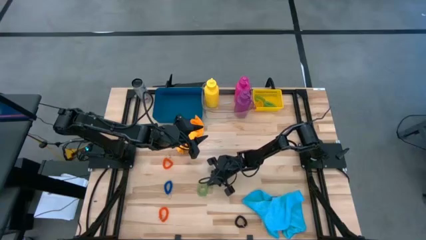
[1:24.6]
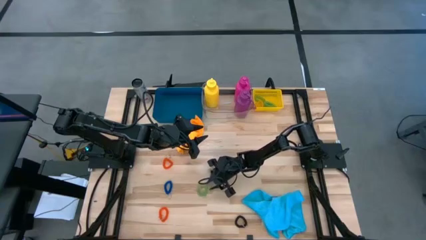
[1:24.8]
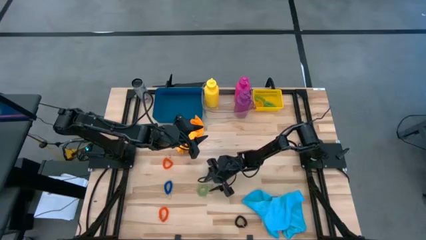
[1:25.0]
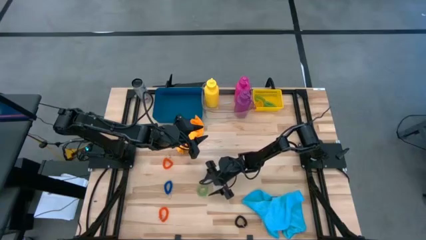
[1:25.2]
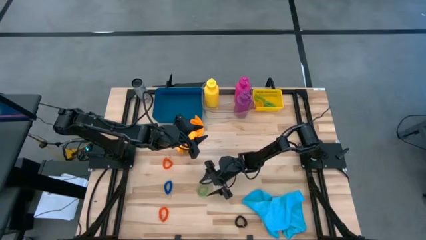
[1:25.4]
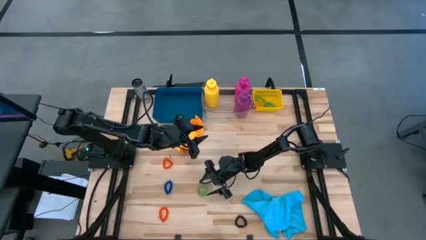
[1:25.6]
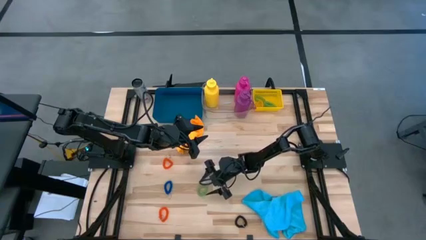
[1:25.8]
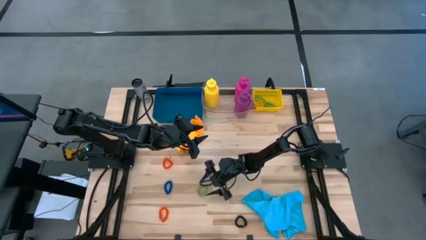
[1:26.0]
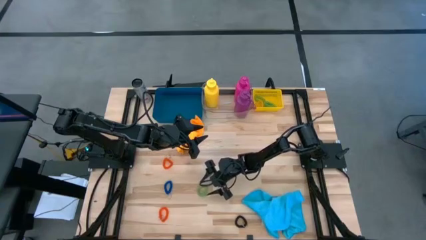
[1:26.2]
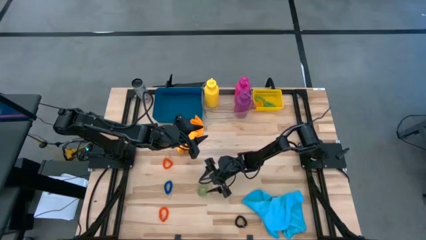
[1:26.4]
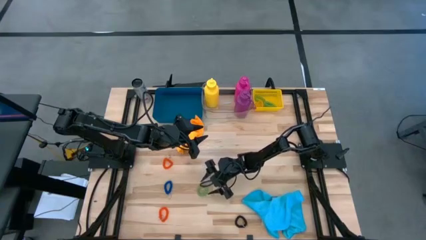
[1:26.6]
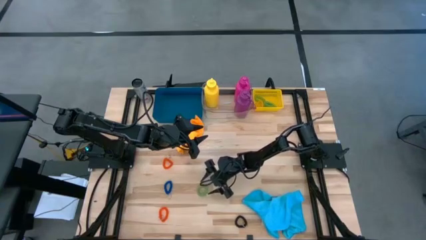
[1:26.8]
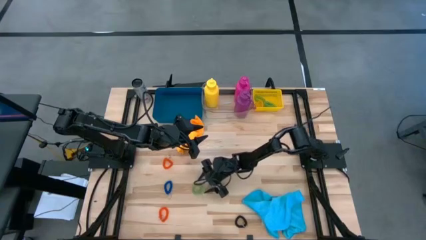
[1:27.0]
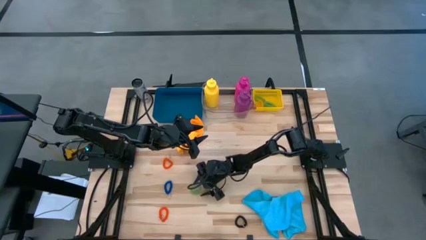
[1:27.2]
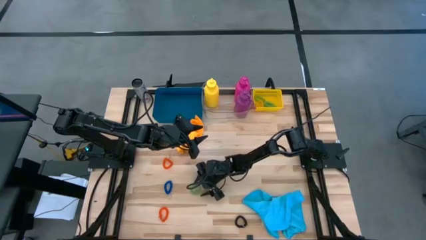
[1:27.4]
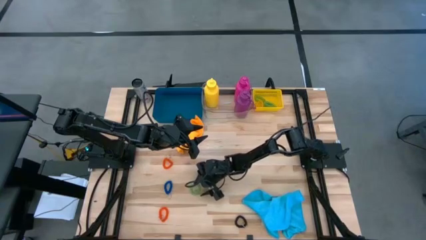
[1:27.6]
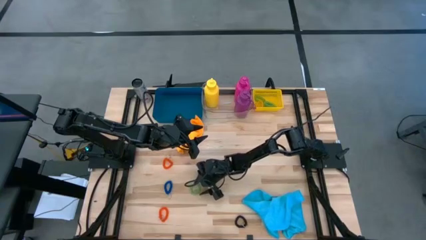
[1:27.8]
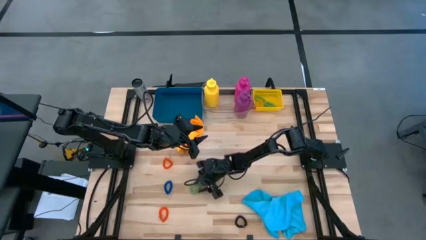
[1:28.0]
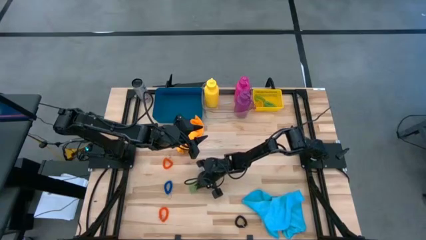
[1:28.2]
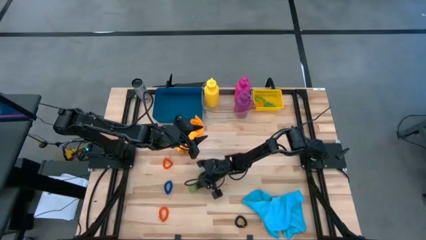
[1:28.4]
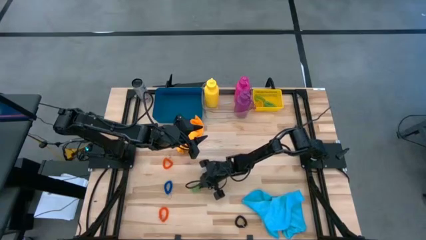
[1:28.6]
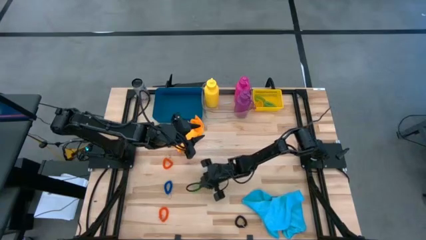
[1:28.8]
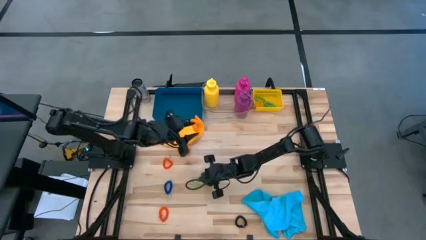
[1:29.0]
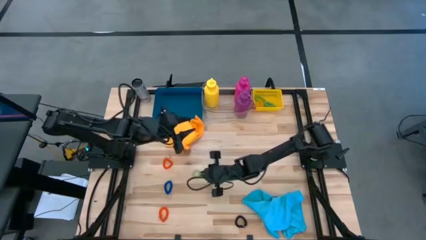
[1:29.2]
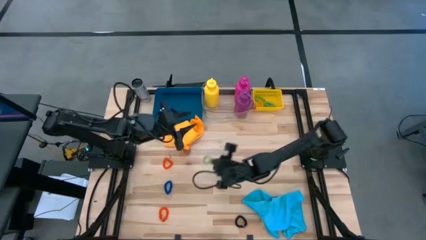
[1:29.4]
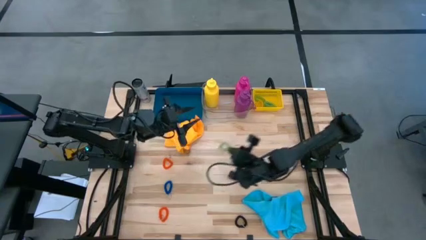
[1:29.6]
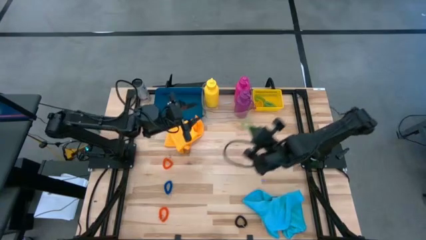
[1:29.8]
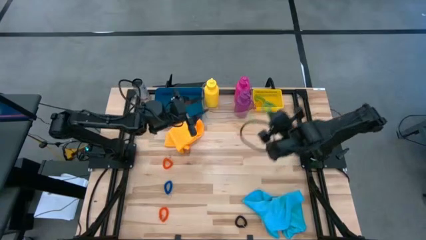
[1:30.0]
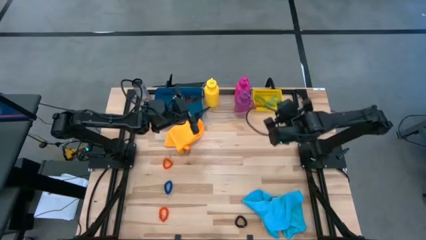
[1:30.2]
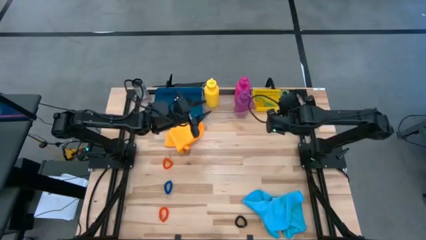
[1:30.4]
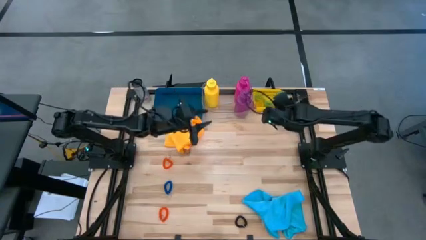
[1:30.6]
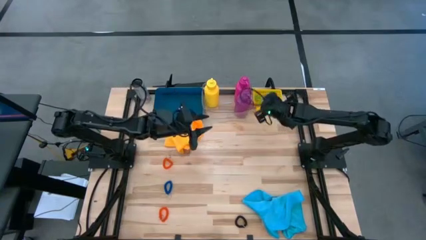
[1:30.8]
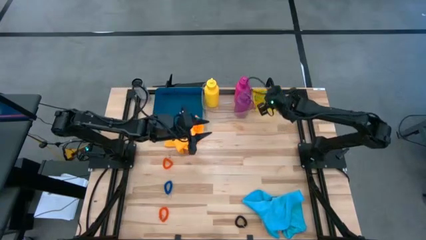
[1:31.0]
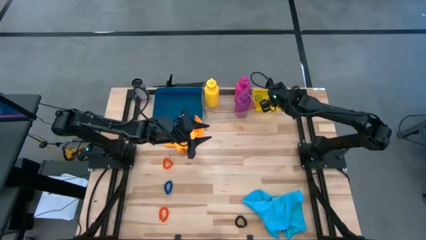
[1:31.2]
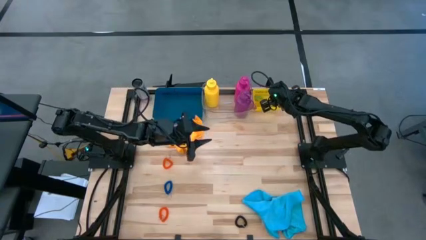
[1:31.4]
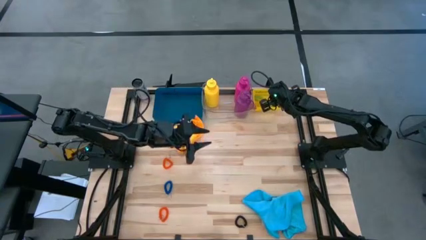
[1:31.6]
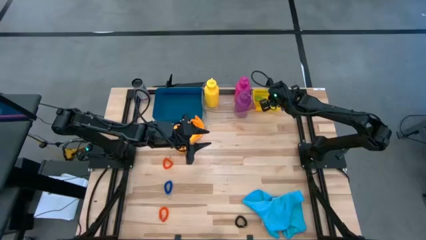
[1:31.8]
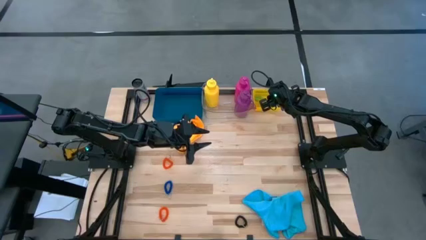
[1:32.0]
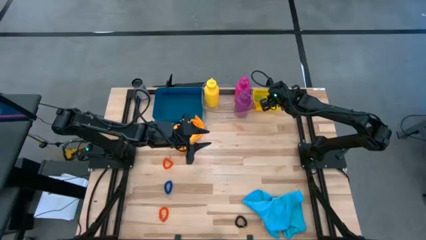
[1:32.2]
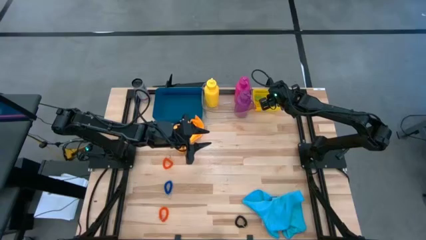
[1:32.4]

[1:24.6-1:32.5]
Task: Pick & Place Sports Items
Put the green spring keychain into the yellow bin

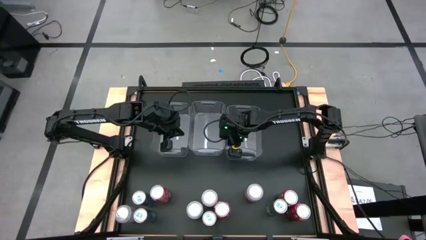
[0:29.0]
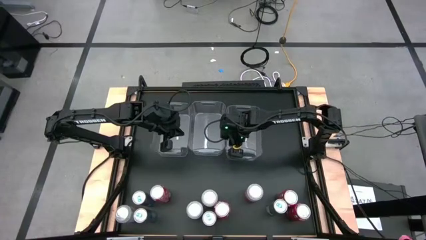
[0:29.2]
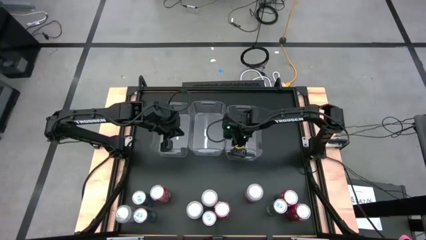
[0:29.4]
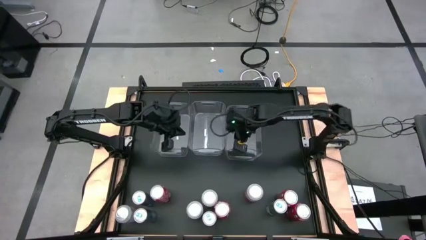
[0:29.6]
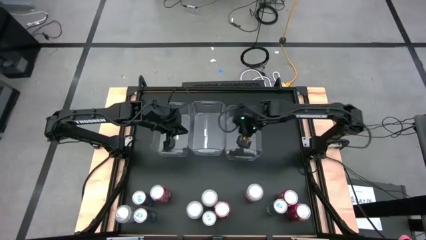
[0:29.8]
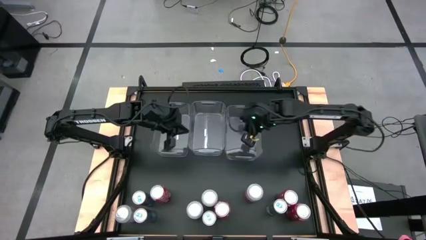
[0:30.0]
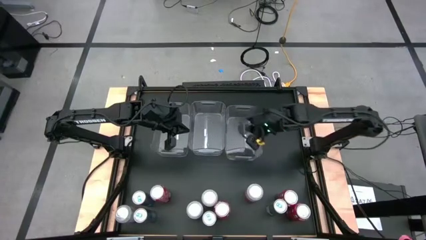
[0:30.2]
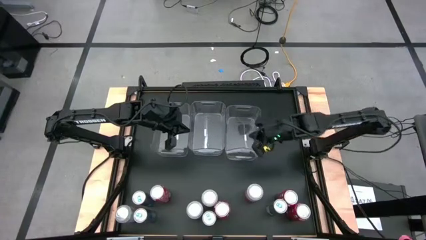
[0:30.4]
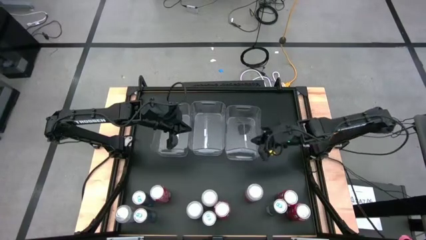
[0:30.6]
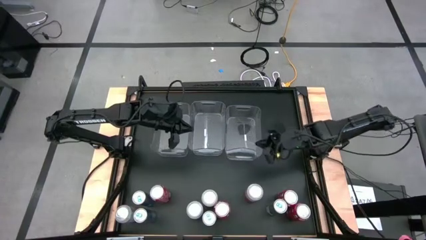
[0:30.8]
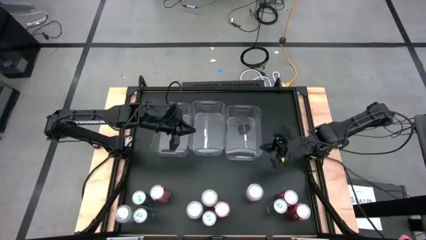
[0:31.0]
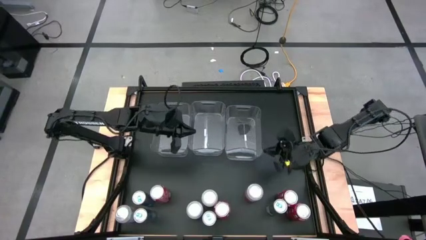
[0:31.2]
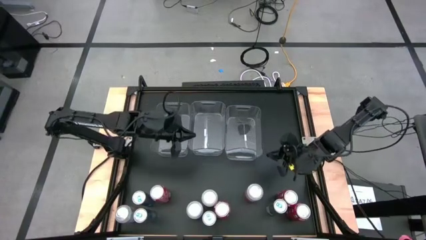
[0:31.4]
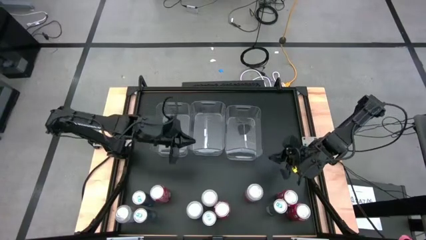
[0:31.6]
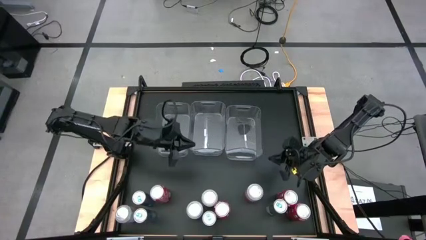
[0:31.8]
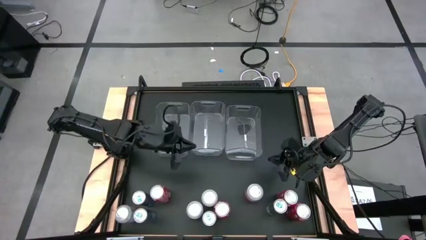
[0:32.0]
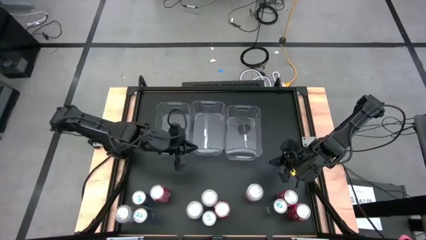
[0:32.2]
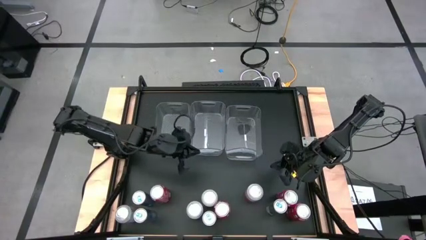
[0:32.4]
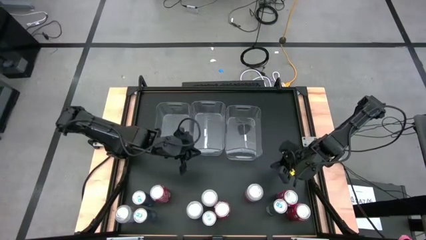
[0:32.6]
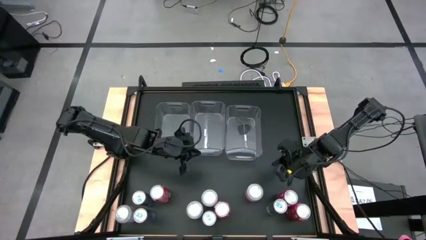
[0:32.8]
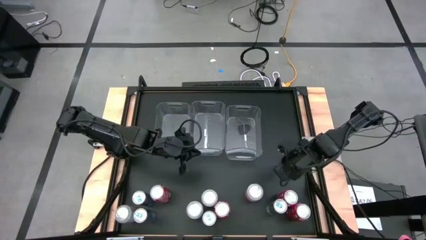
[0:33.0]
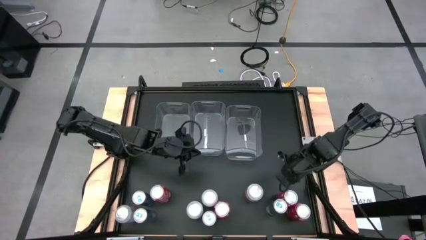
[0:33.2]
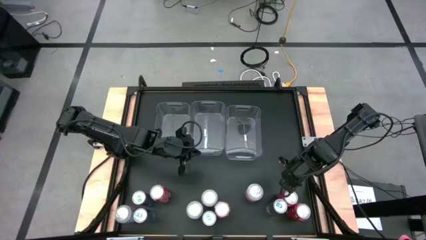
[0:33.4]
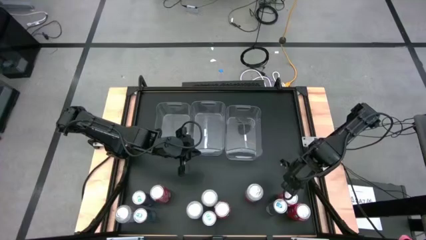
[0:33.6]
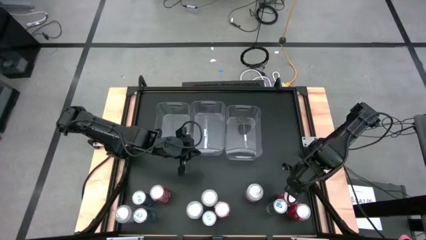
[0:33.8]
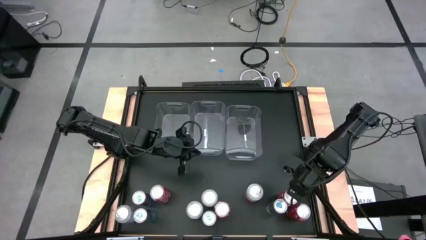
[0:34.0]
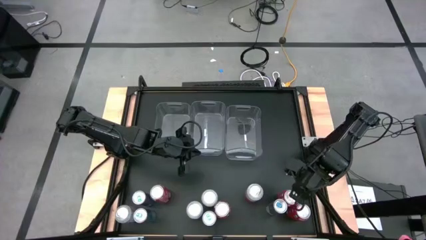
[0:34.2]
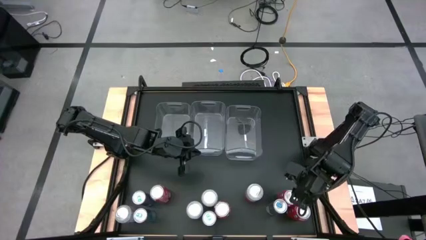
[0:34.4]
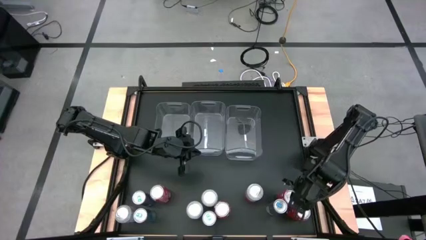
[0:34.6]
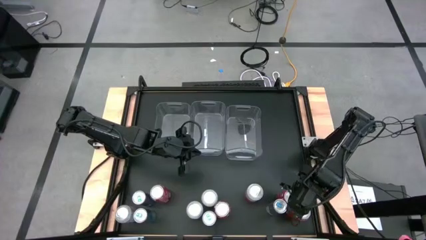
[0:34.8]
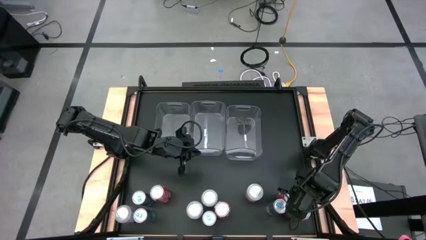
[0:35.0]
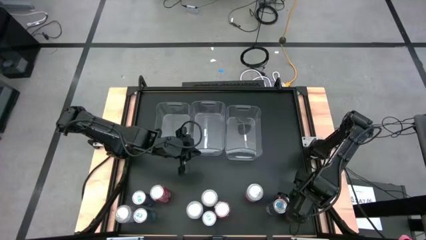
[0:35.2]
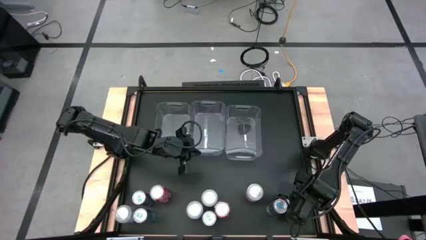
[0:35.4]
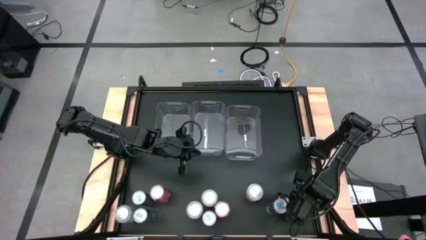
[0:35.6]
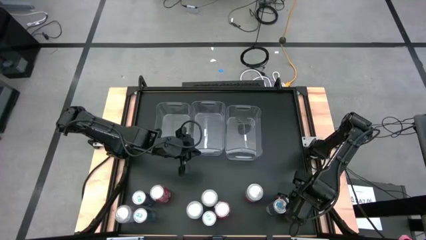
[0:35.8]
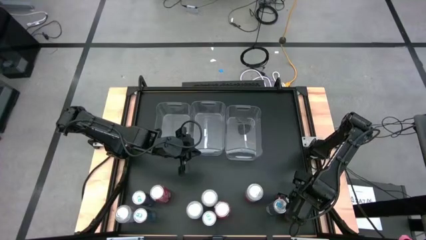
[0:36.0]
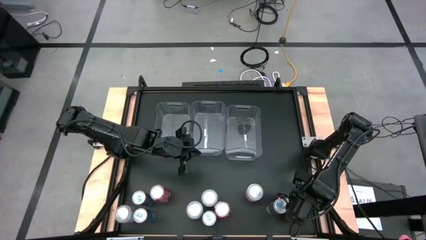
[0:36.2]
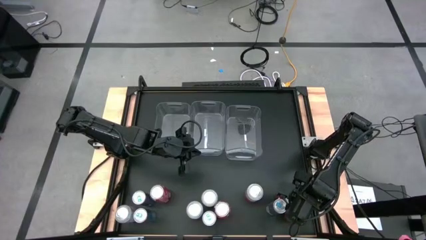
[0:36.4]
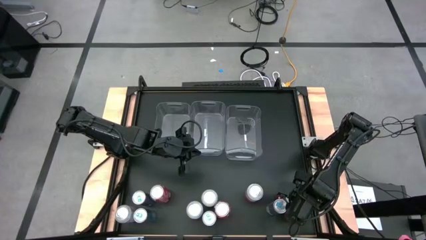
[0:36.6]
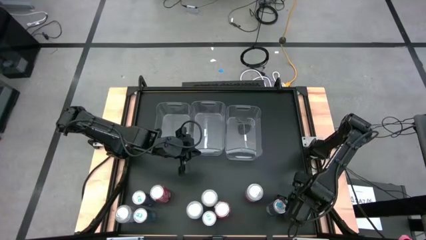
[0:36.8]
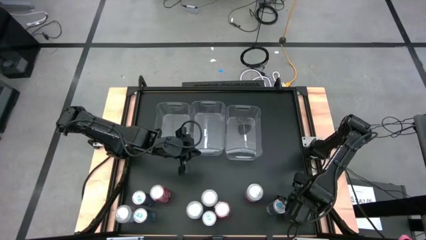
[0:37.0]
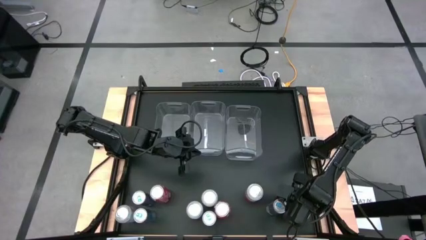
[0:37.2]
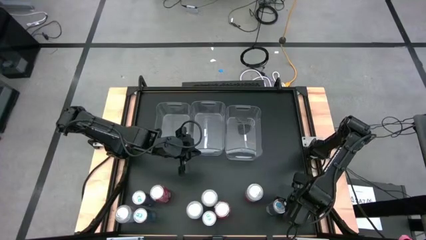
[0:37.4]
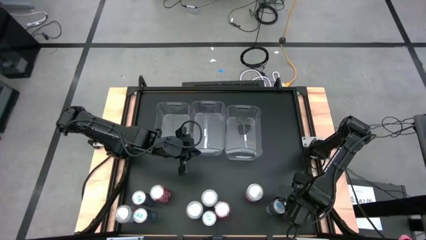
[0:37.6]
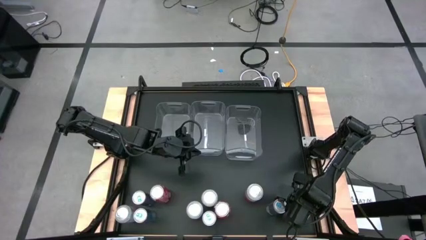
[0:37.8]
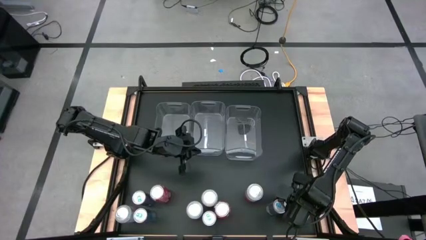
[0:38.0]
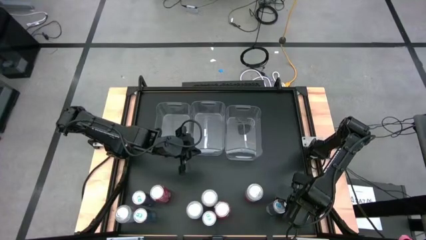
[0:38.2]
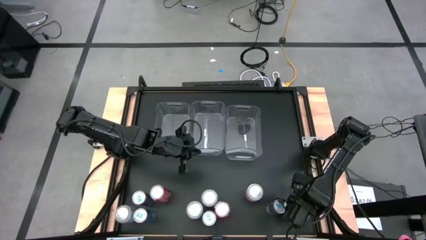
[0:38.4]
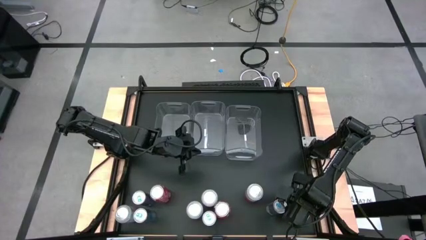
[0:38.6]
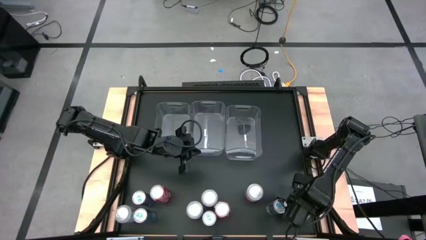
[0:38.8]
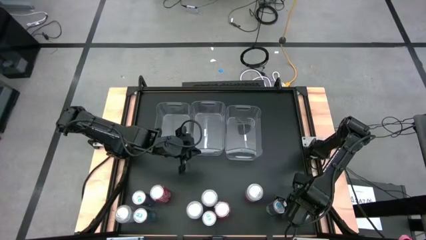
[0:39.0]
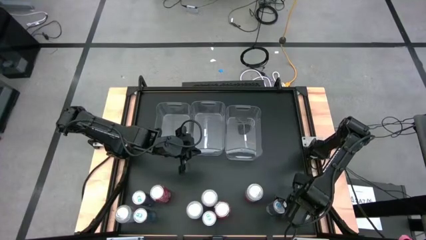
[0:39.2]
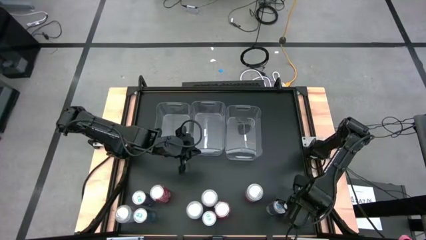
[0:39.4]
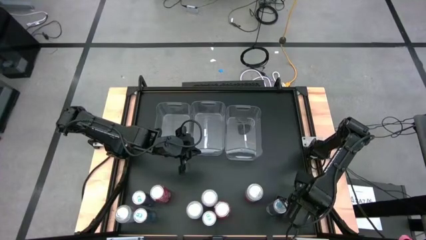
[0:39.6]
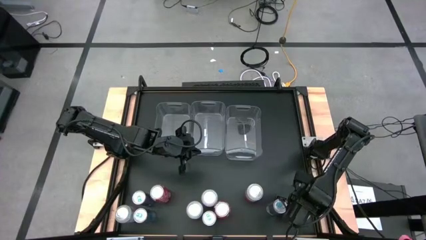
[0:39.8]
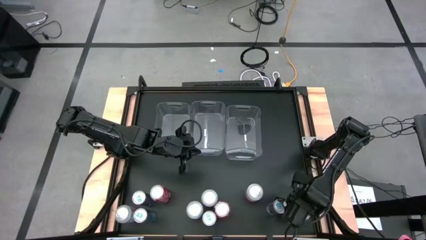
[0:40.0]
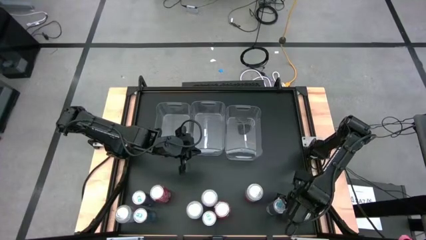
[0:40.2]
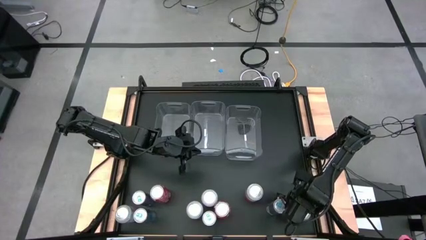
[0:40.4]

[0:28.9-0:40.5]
Task: Sort soda cans
Put the red soda can into the right transparent bin
